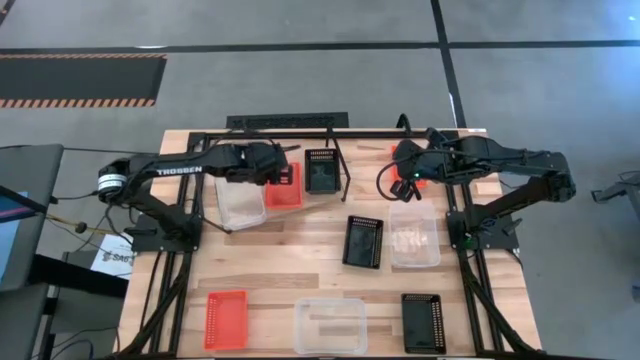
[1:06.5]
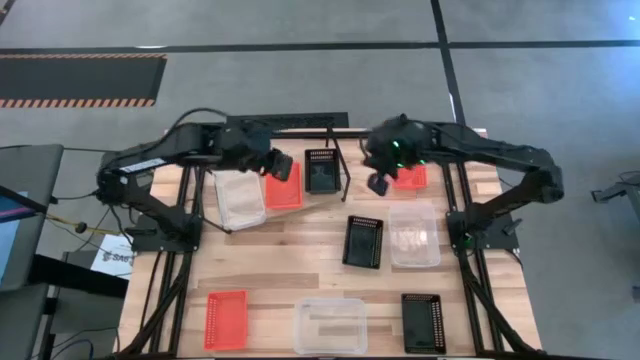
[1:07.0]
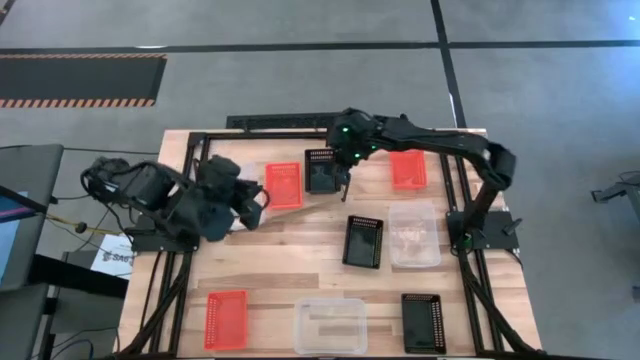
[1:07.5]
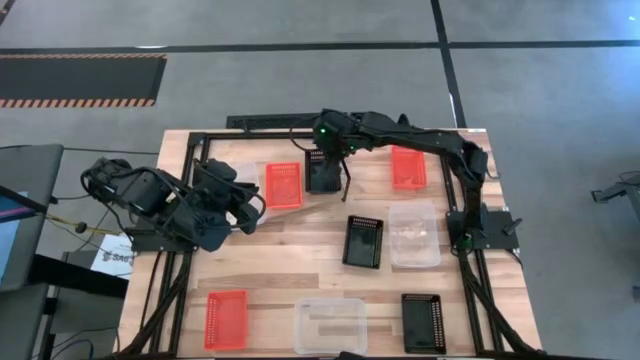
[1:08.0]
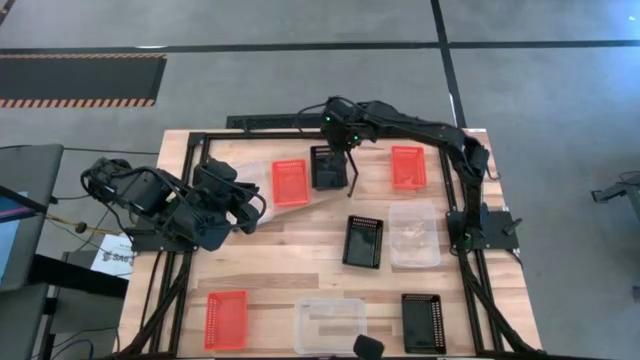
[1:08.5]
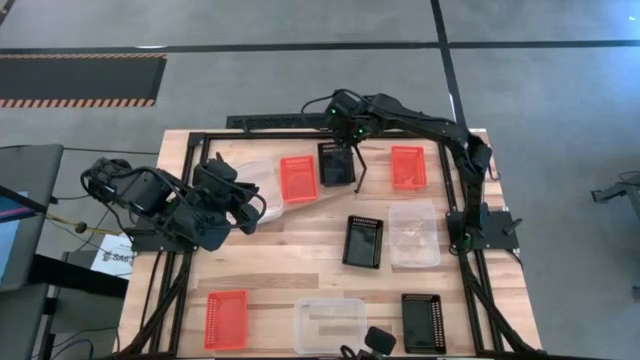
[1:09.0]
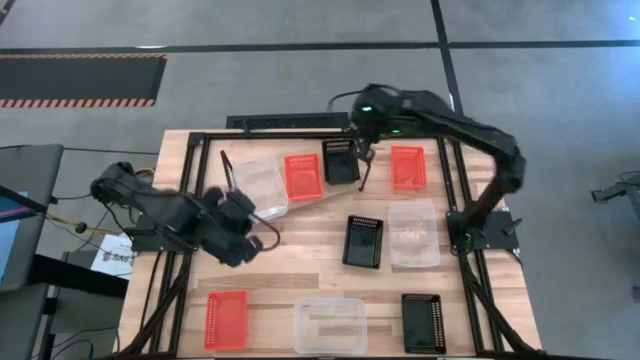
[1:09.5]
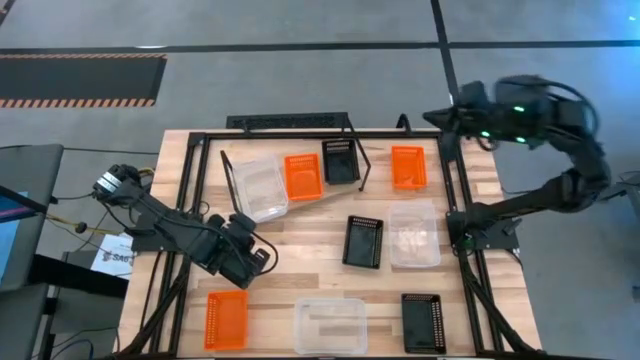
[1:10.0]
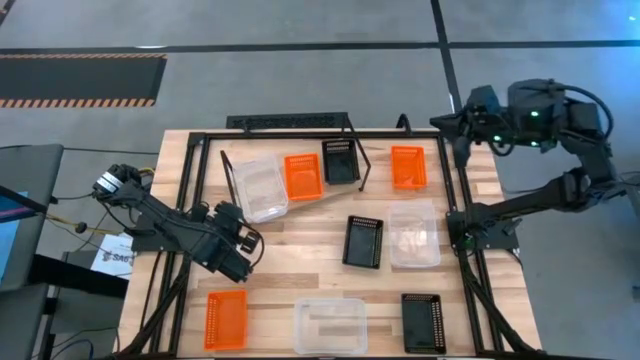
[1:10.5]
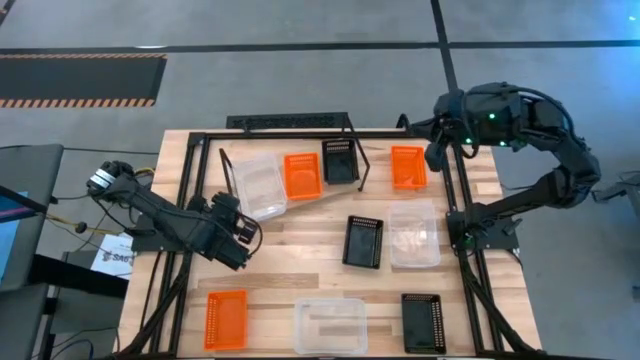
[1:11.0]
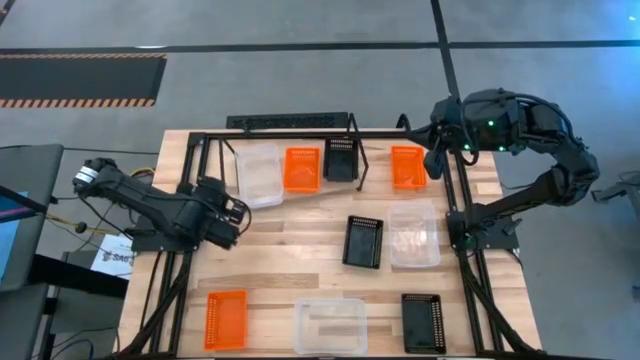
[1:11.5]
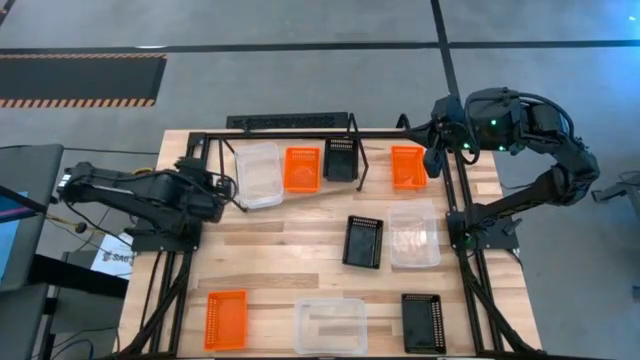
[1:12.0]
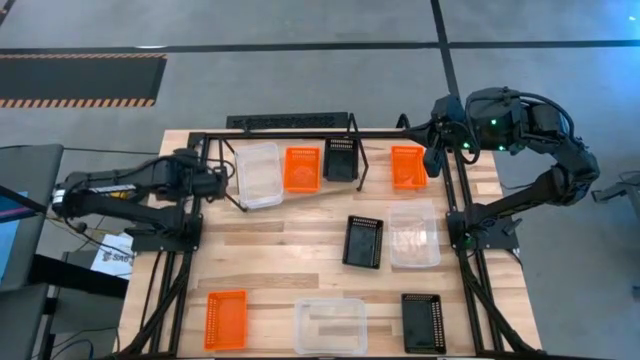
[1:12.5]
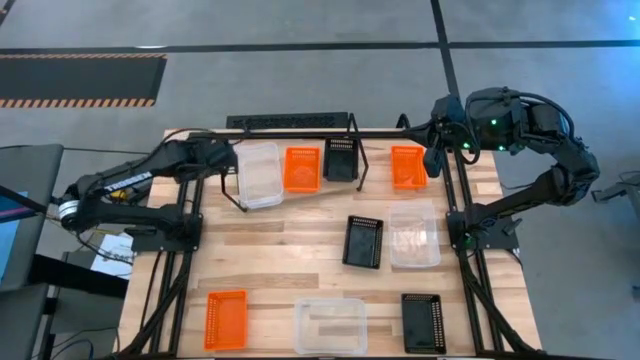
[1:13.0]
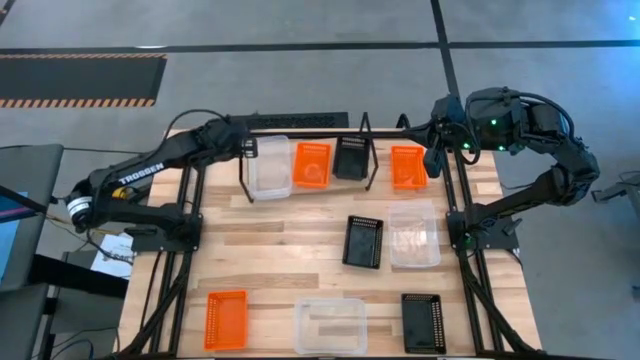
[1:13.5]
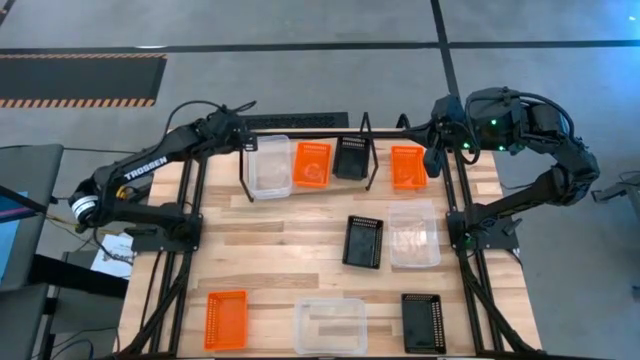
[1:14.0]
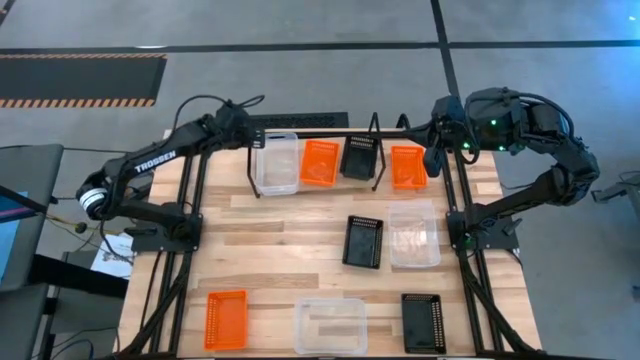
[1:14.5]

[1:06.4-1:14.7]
Task: Stack baskets on shelf by color
Adjust the shelf

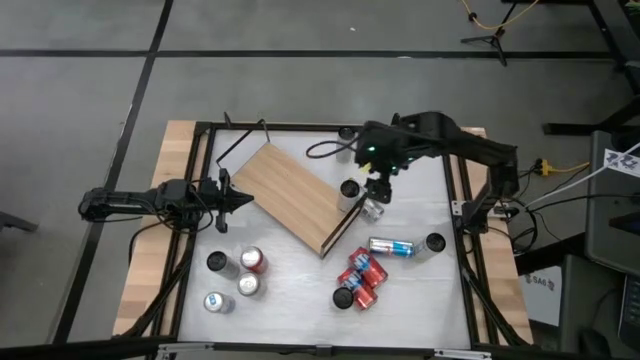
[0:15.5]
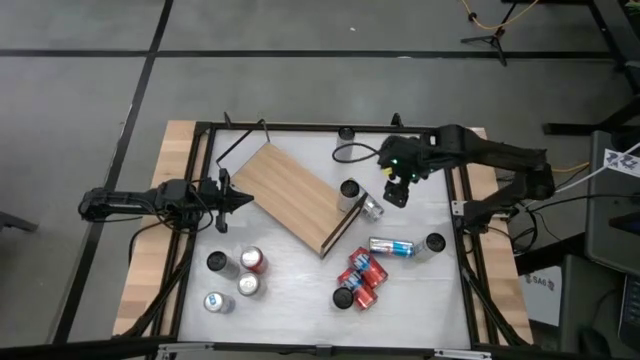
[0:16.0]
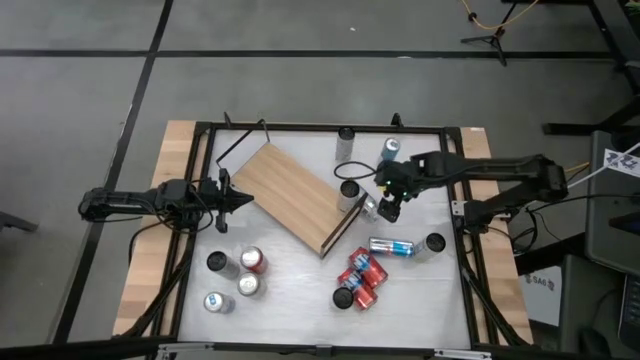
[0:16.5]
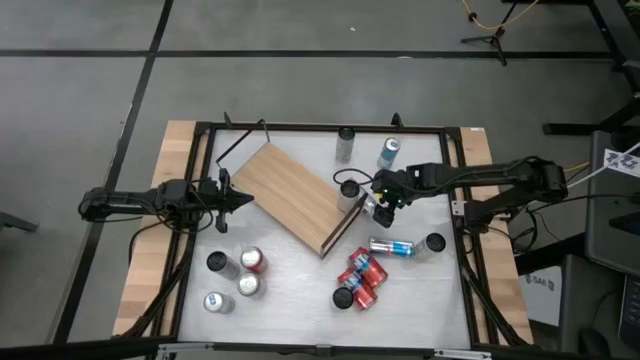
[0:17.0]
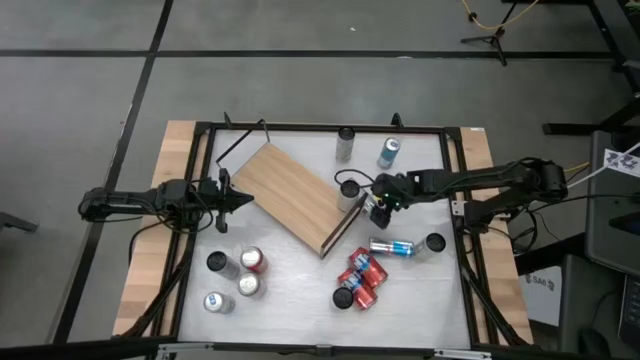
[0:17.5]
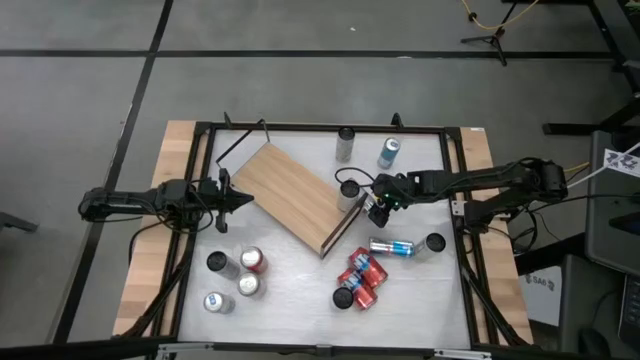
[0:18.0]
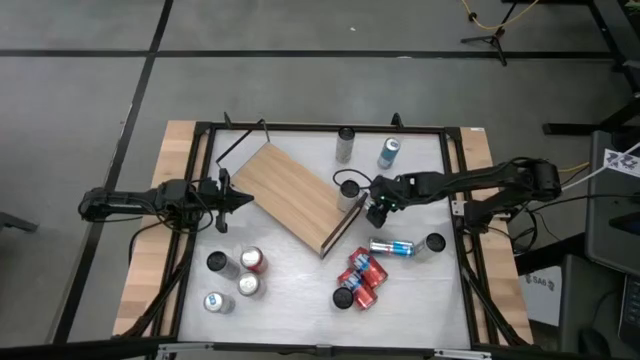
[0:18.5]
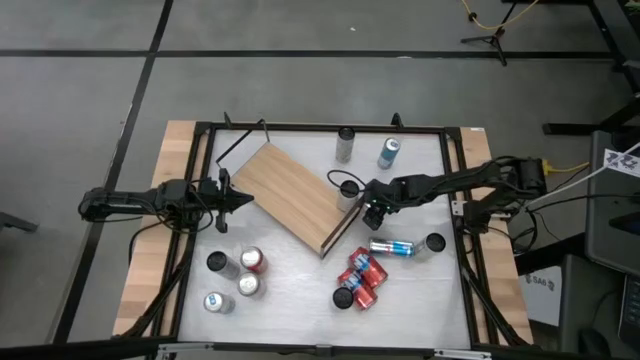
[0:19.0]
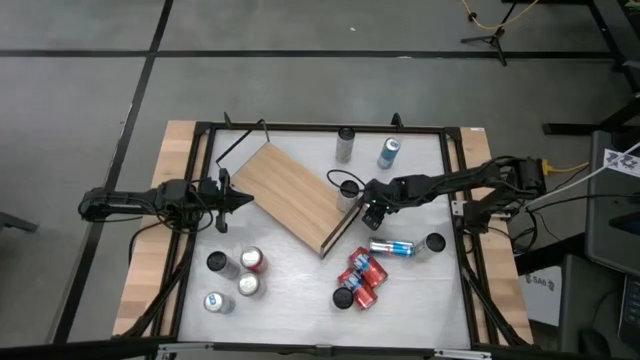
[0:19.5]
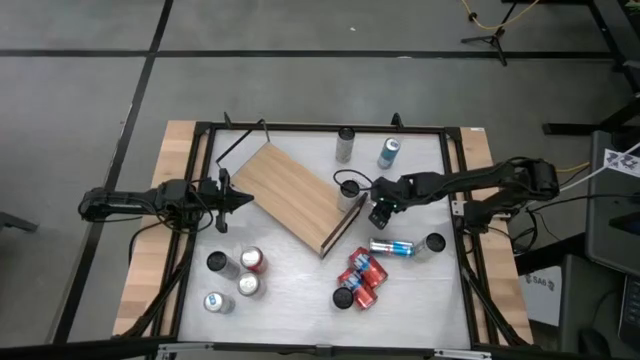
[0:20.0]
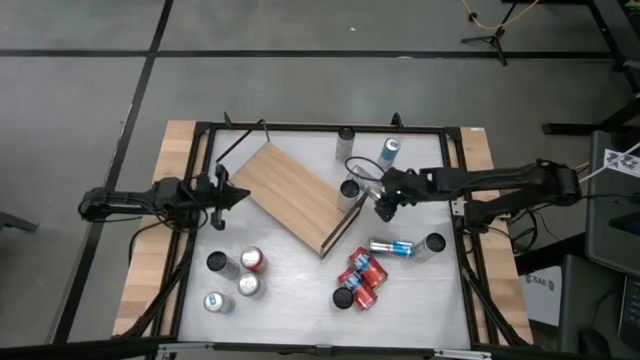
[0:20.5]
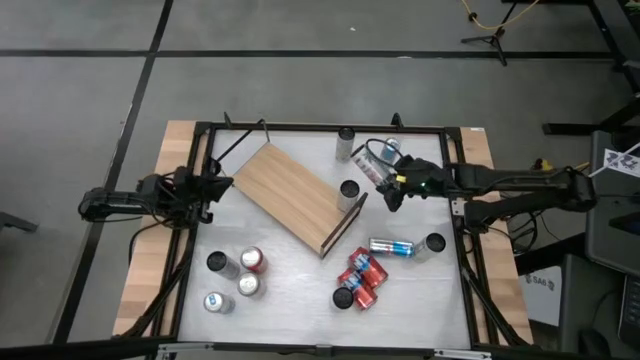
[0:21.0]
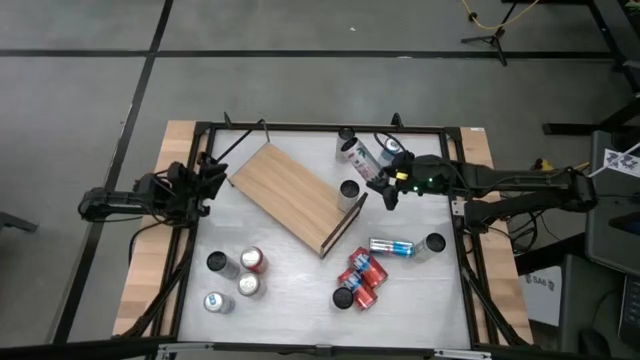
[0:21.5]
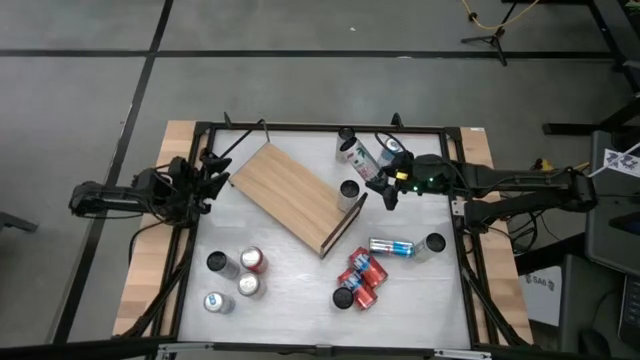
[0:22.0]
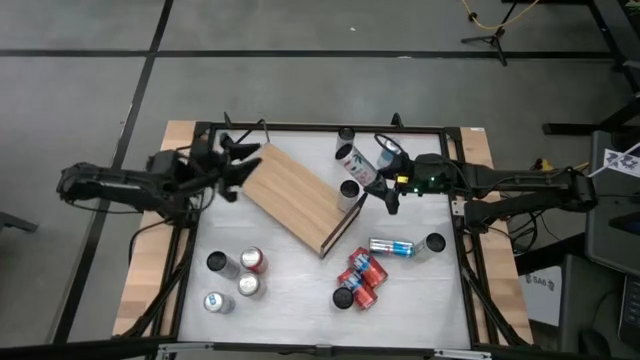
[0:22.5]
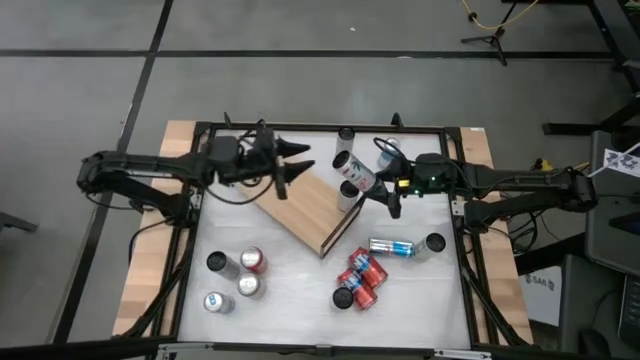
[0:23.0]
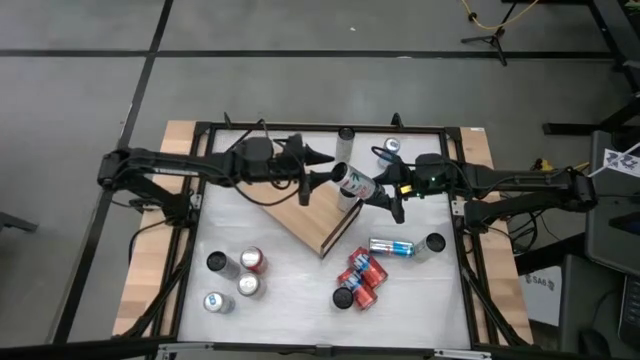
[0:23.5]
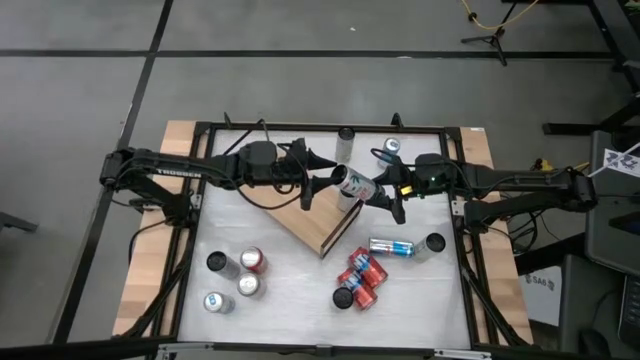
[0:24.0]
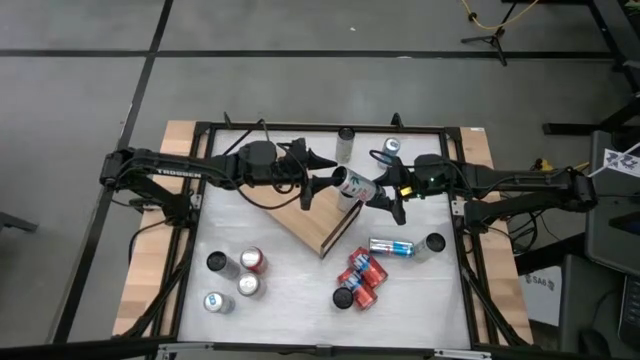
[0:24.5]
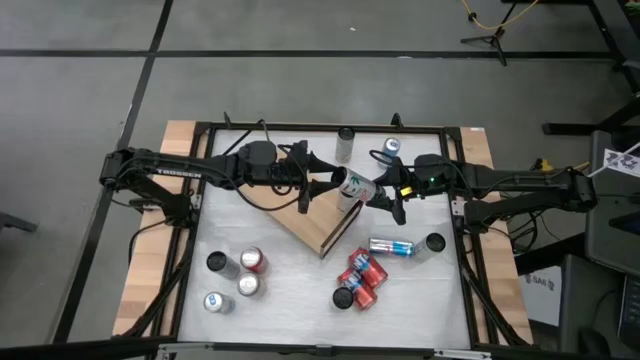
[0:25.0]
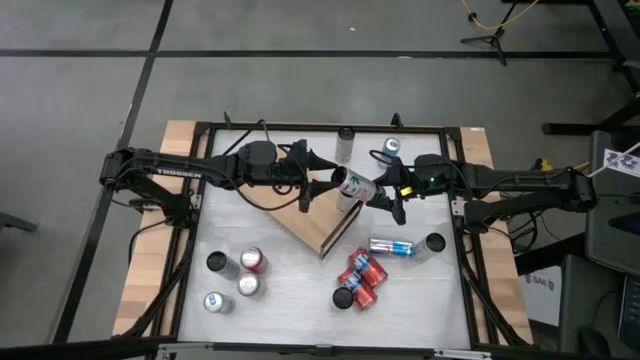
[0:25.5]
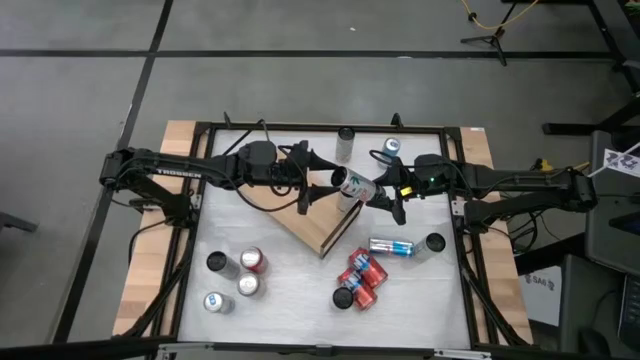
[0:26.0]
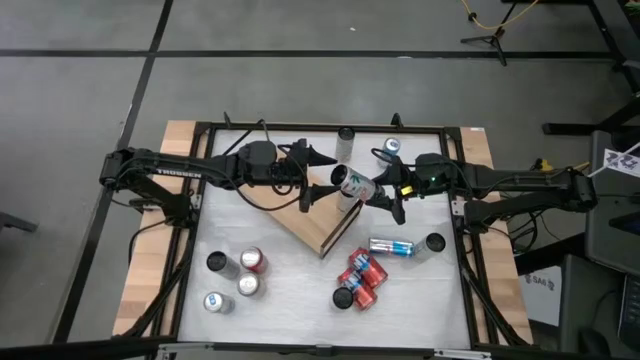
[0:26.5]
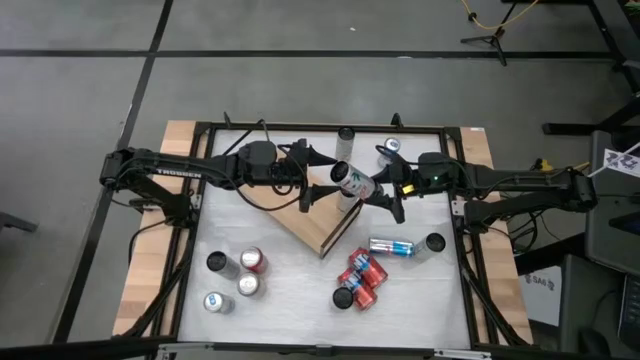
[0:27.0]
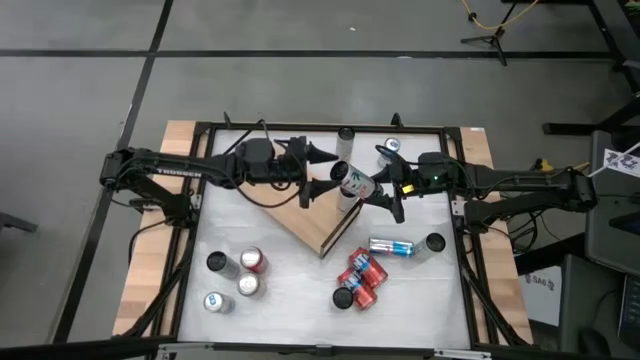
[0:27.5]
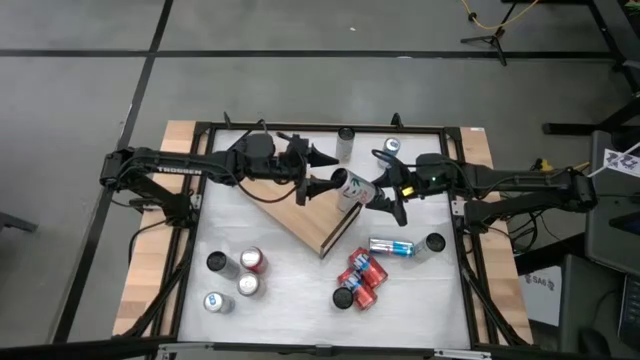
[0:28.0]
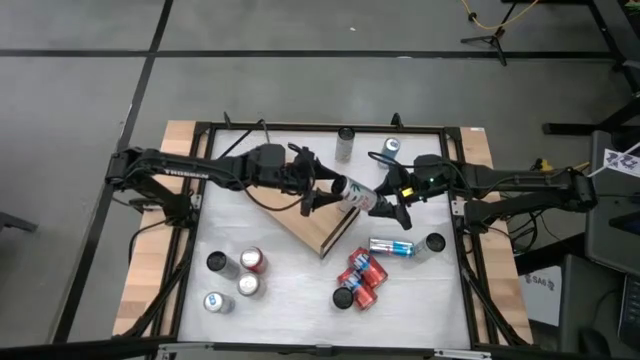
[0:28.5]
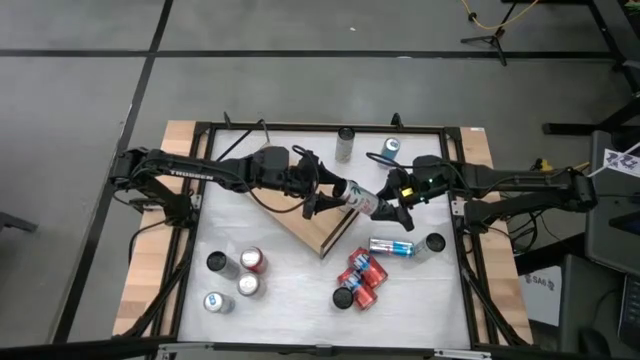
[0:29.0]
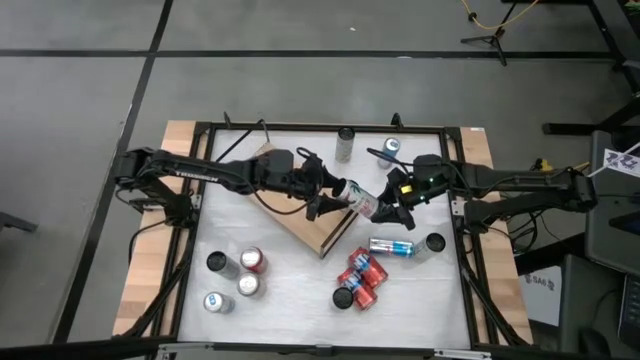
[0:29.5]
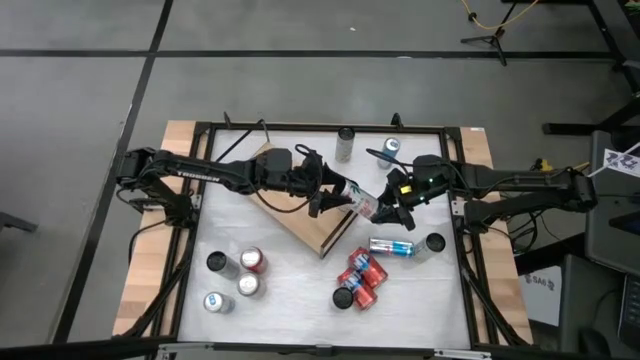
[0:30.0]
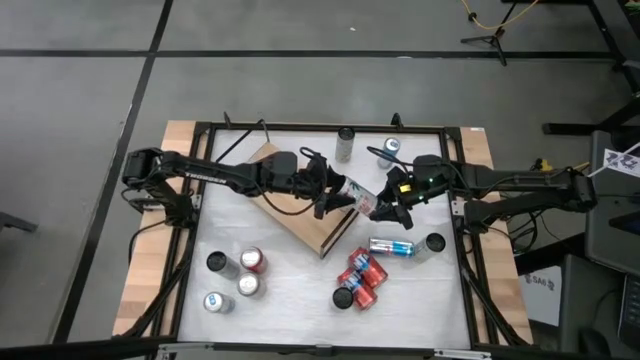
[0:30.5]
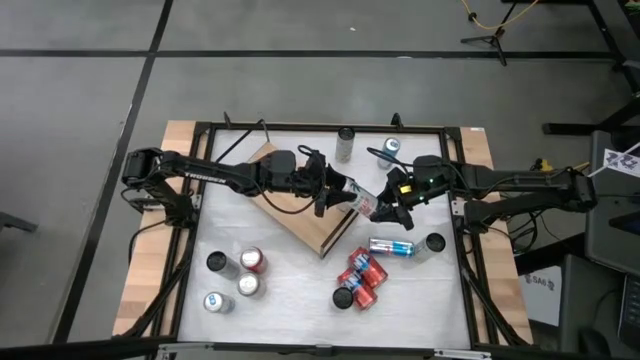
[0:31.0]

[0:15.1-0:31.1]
Task: Place canned beverage on shelf
Put the top white-pink soda can on the shelf aligned with the other white-pink soda can
